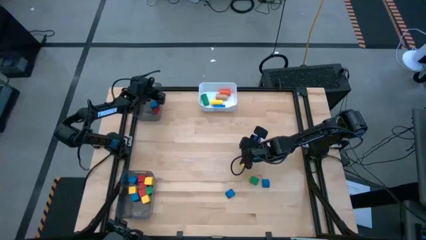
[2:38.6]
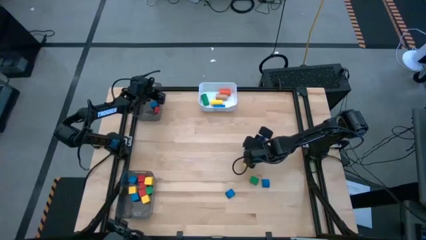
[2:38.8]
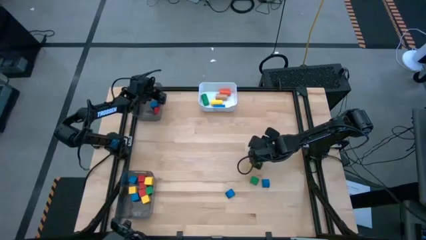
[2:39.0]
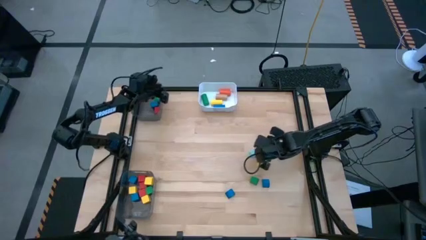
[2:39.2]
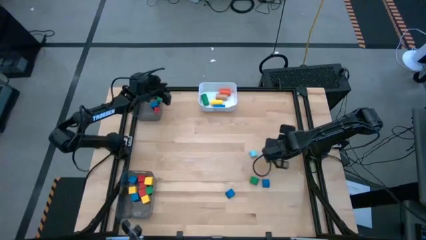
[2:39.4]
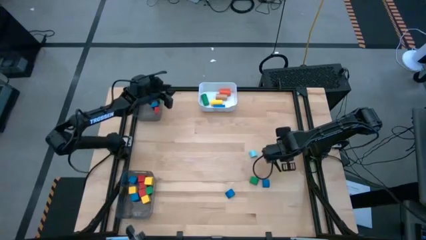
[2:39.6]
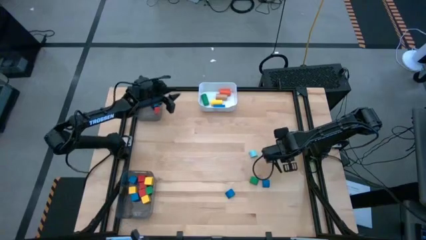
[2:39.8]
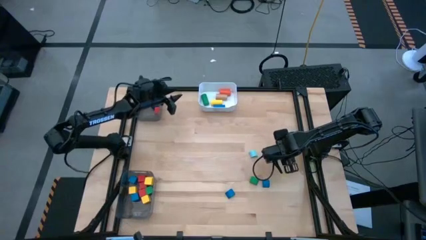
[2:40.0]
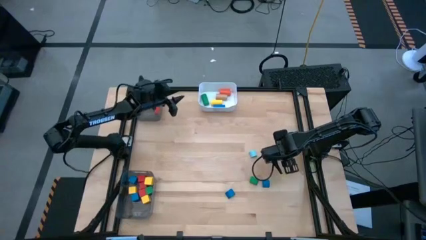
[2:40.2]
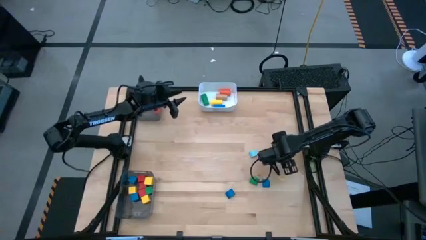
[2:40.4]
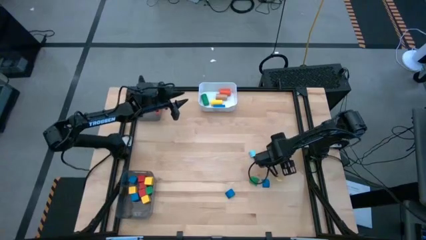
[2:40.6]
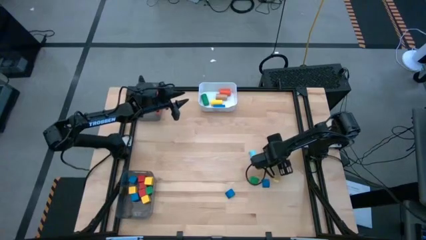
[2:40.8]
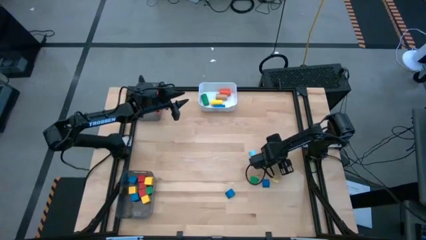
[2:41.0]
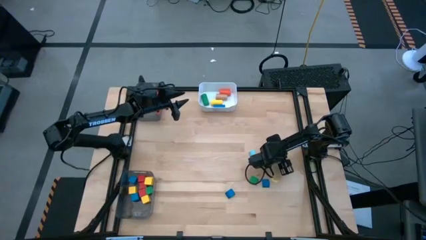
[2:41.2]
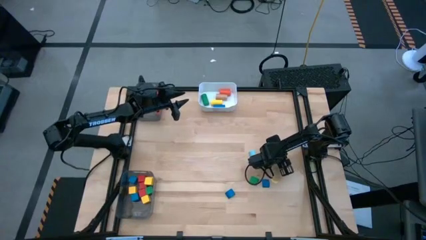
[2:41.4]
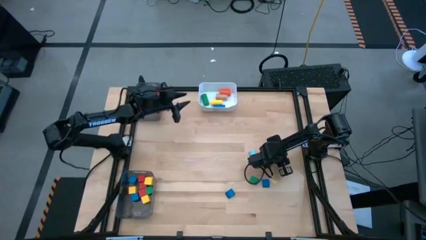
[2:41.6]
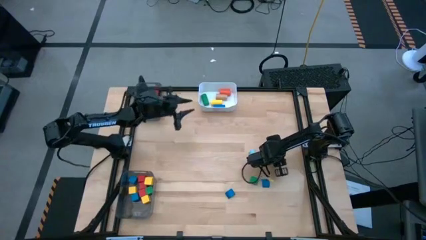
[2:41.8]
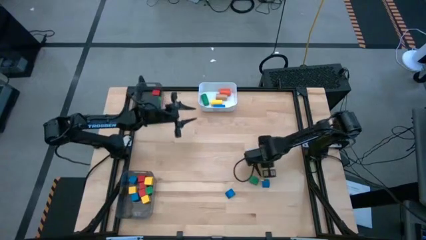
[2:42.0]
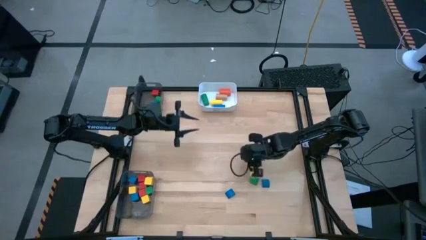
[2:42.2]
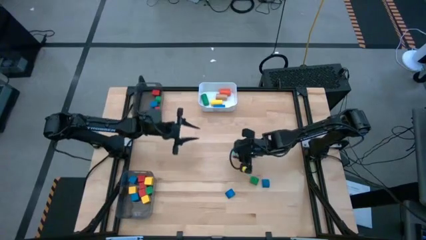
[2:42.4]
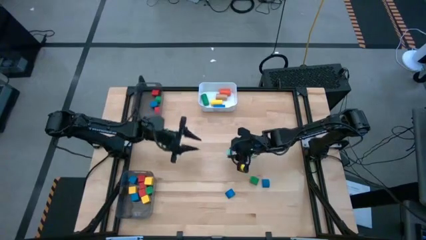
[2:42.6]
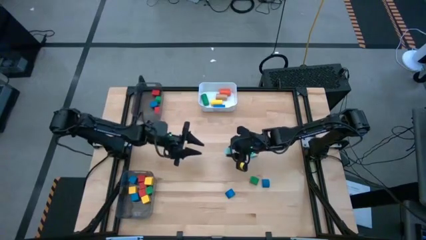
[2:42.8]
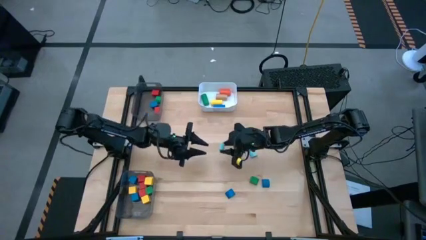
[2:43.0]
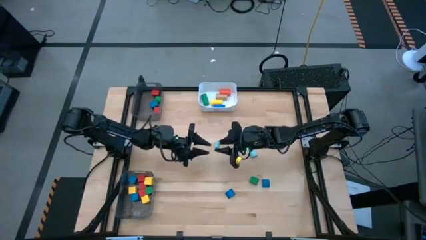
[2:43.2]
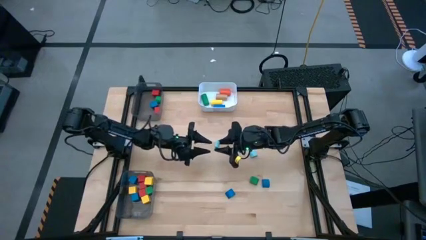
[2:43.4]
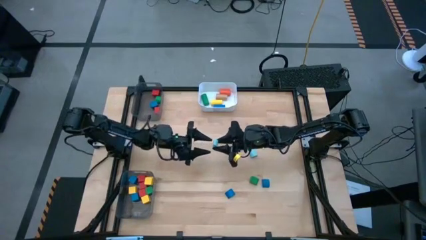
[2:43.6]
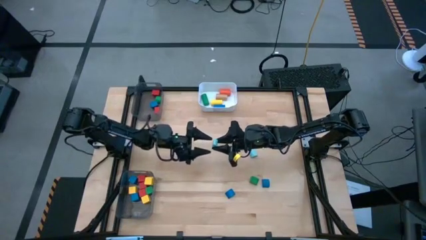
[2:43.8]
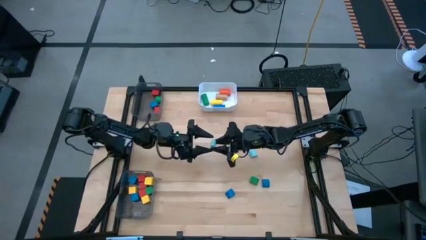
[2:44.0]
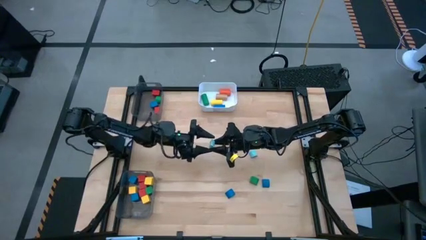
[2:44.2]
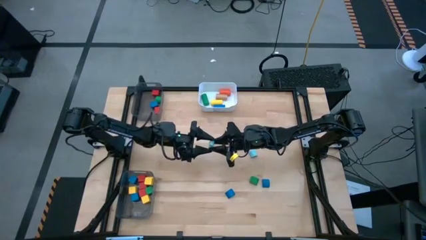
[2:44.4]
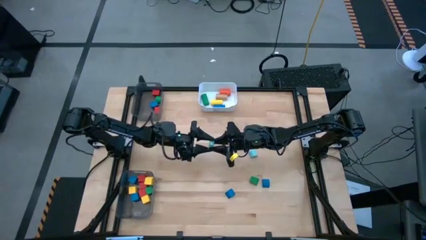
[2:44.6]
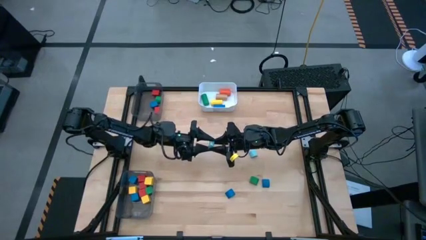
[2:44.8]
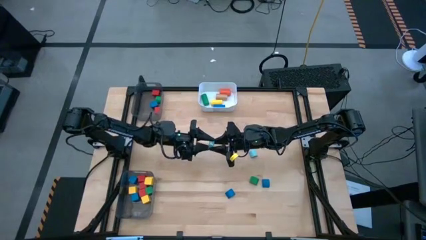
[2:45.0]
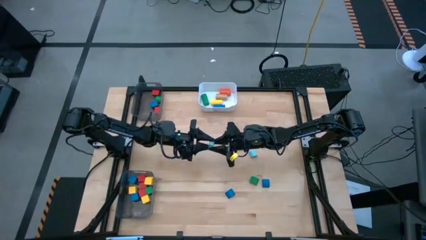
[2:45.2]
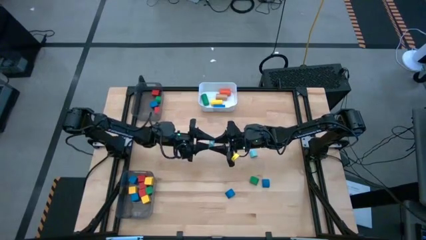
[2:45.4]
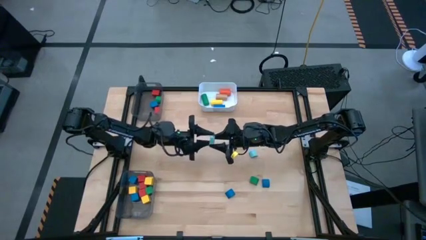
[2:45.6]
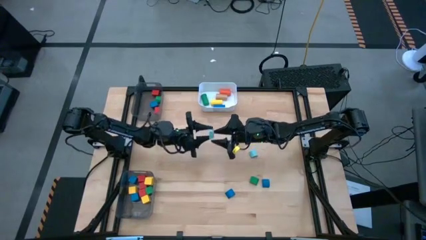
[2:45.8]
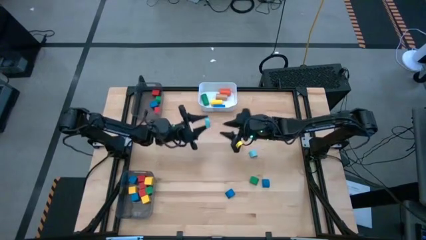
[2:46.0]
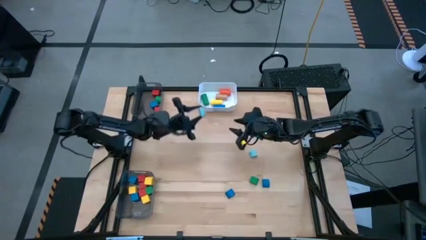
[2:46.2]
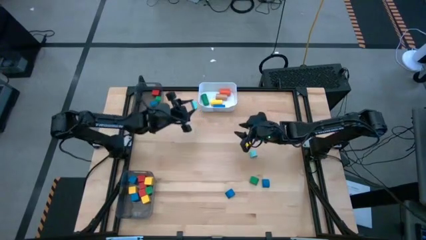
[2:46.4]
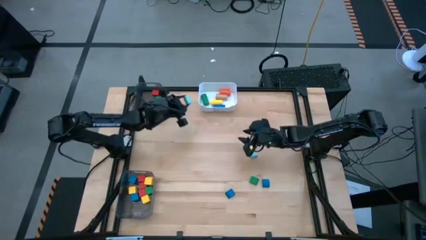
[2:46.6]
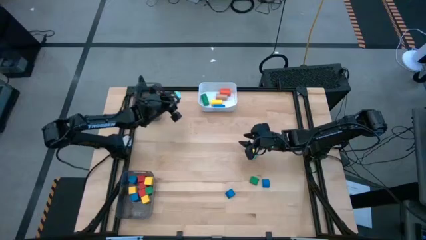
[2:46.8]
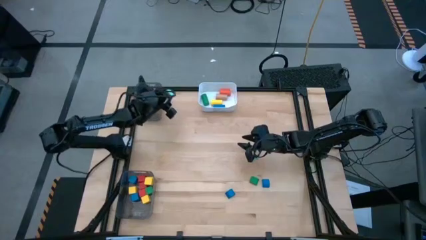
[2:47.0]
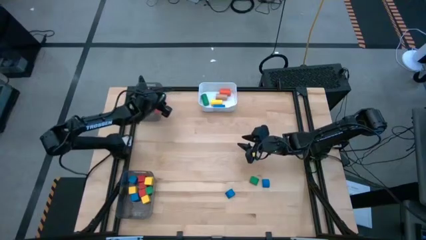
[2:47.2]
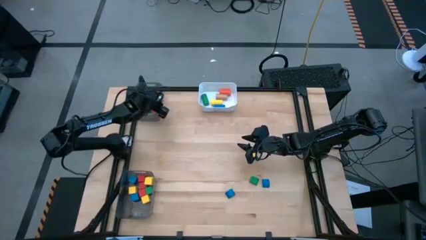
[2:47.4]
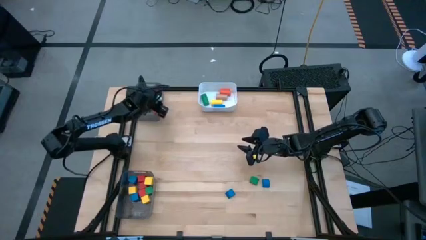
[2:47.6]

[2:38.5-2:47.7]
Task: Sort blocks by size
Put the light blue semicircle block into the top black bin

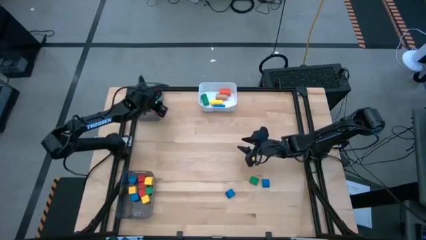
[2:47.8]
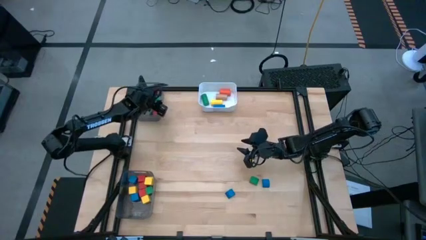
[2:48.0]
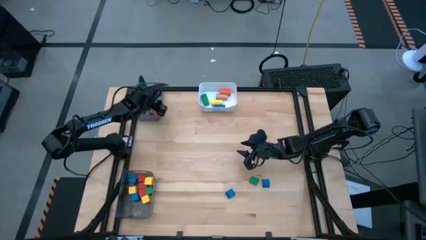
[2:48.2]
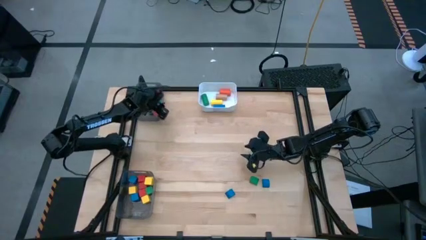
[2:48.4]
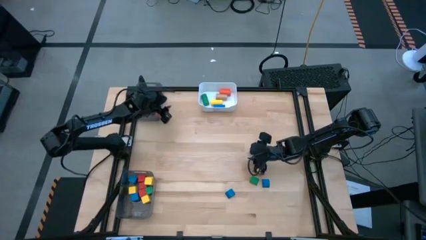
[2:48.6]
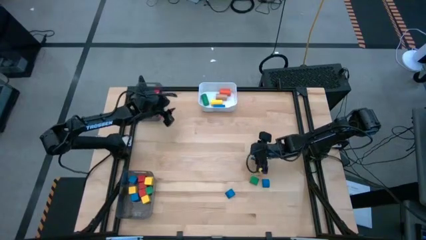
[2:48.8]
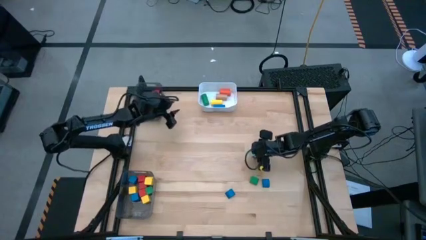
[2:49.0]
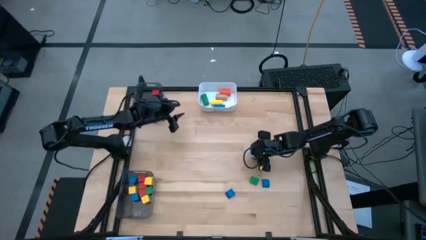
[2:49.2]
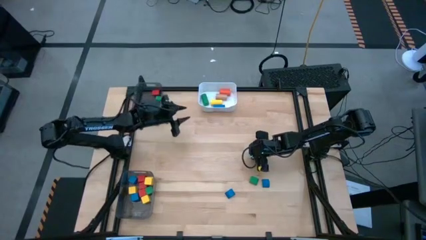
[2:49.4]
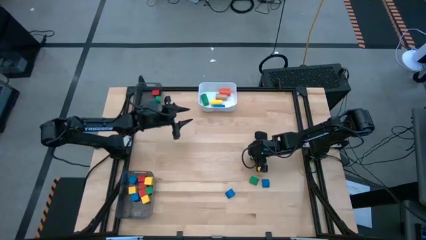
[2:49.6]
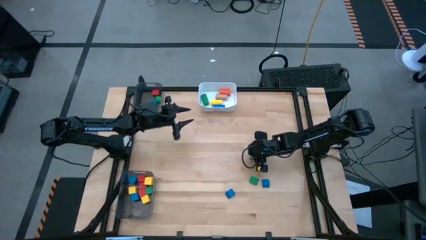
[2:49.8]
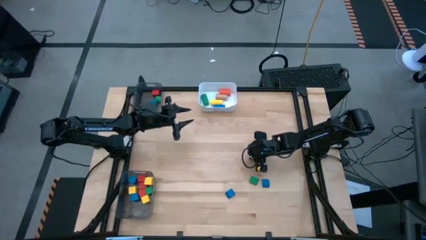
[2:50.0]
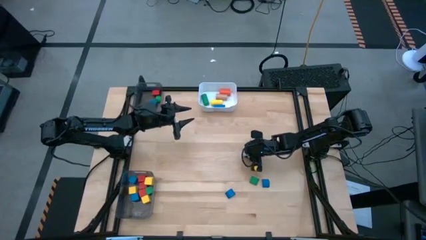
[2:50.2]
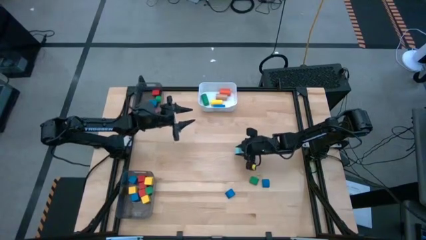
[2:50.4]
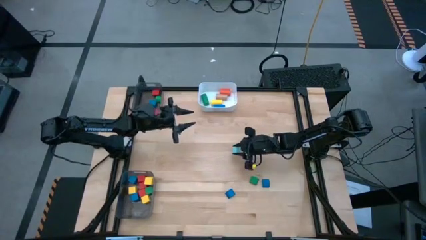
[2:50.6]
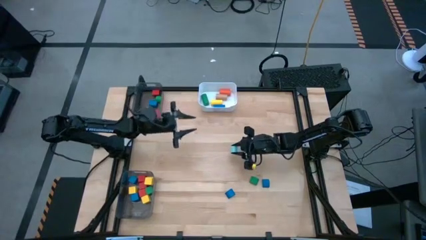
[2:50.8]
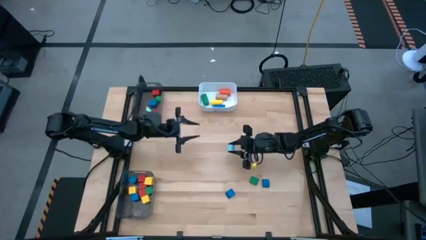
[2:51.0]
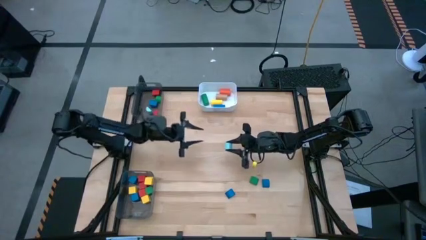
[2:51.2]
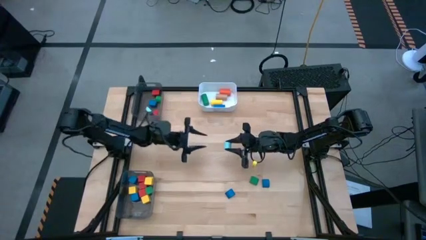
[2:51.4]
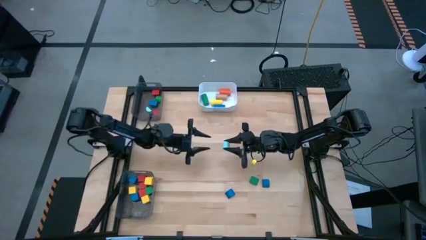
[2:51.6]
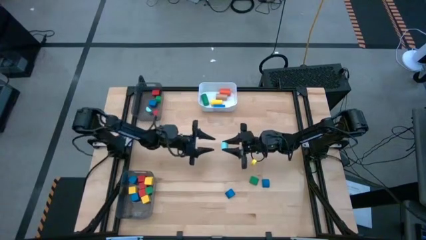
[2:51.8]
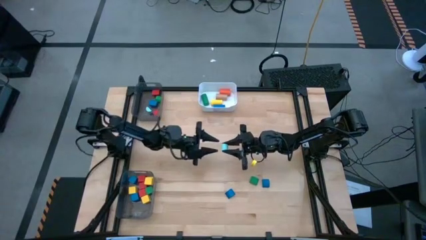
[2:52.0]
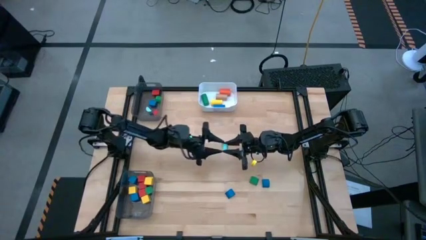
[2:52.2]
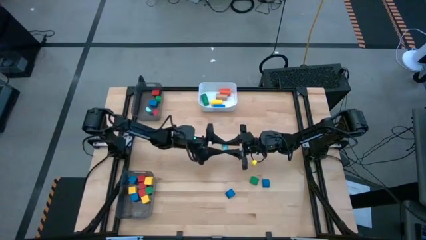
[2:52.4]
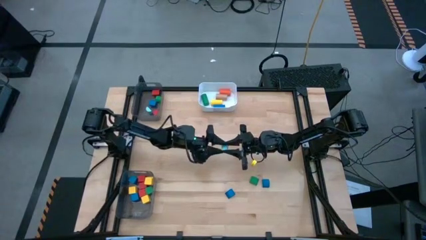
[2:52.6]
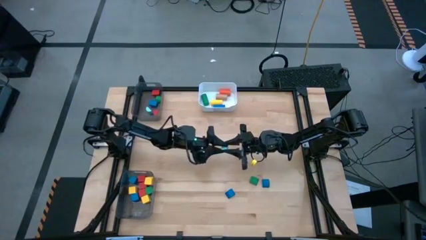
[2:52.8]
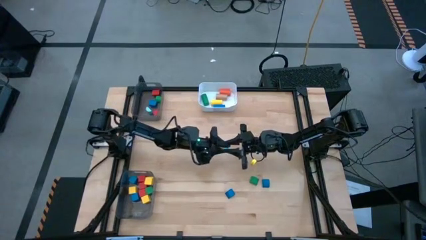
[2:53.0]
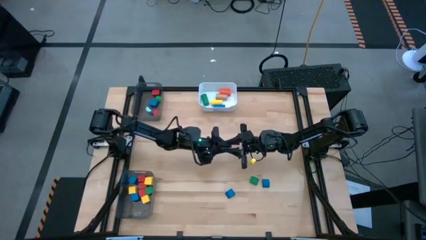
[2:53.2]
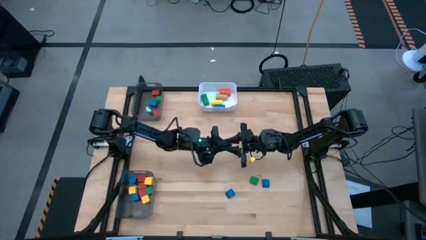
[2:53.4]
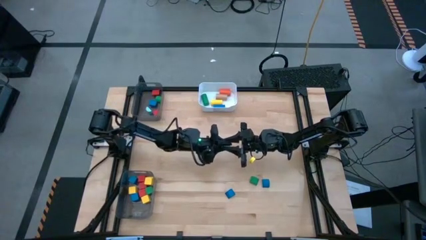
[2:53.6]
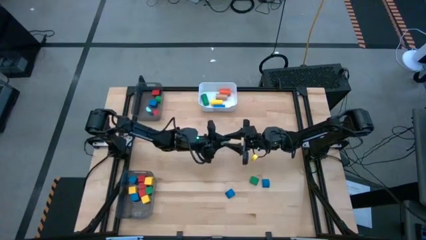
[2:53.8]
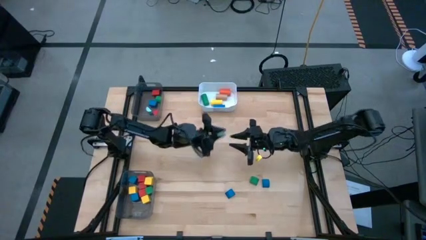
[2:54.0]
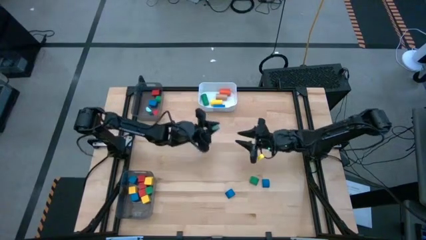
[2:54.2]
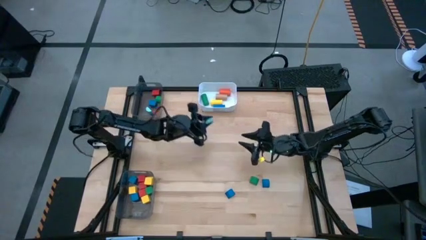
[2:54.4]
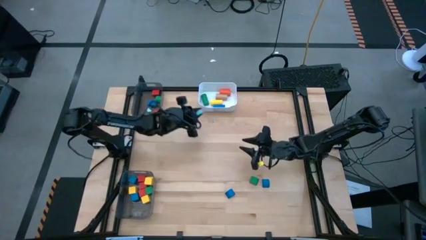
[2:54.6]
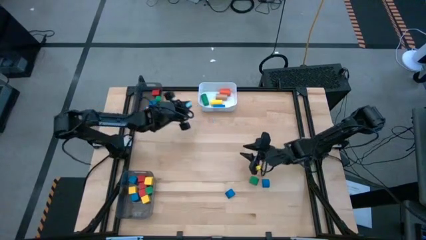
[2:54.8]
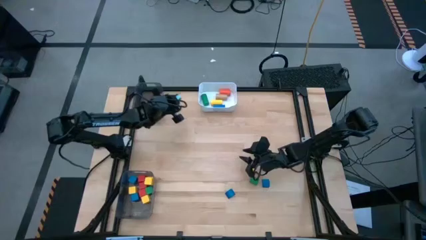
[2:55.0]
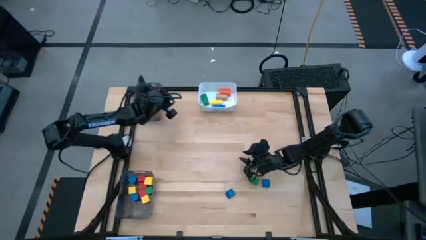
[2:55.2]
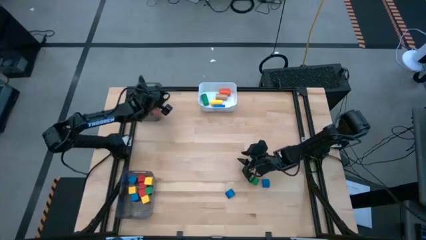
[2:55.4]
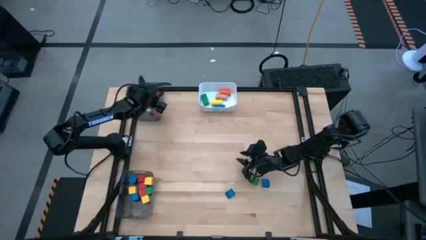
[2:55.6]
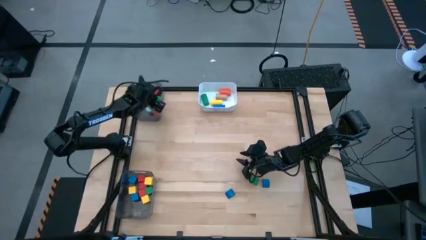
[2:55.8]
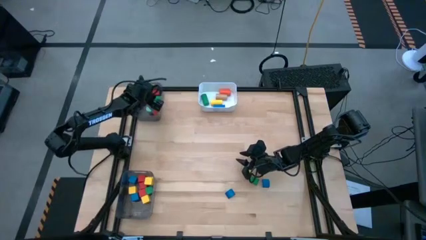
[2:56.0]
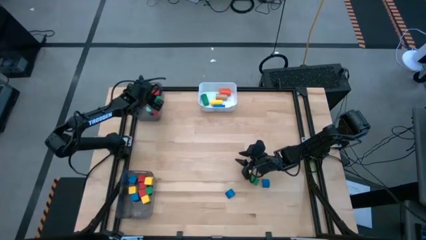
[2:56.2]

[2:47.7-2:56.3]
Put the light blue semicircle block into the top black bin
